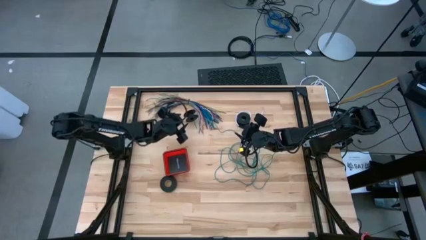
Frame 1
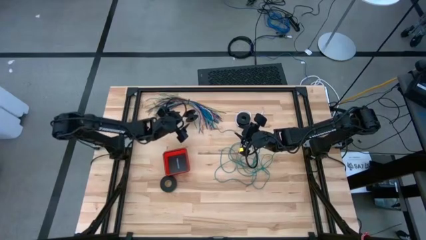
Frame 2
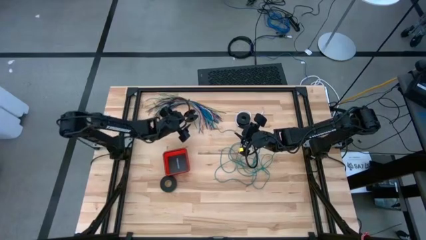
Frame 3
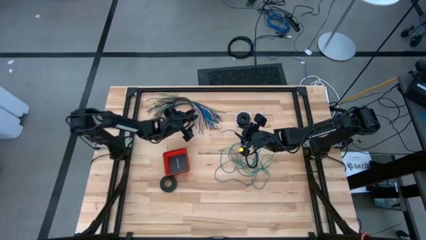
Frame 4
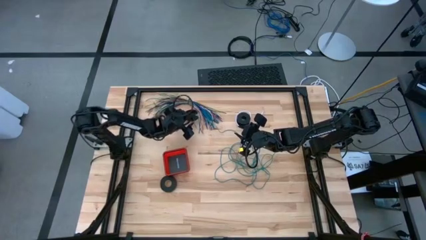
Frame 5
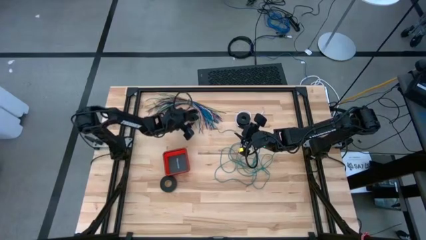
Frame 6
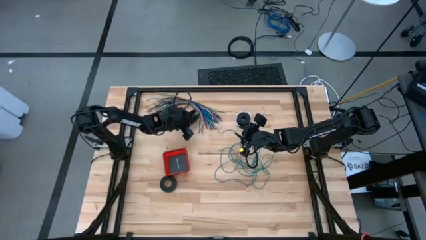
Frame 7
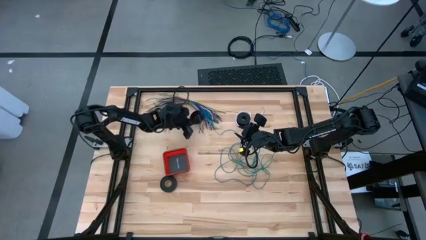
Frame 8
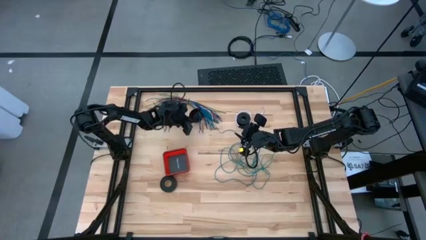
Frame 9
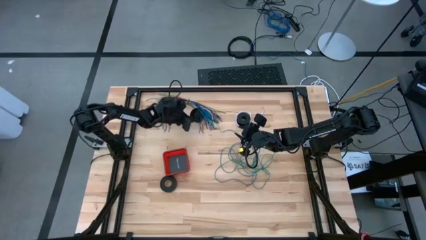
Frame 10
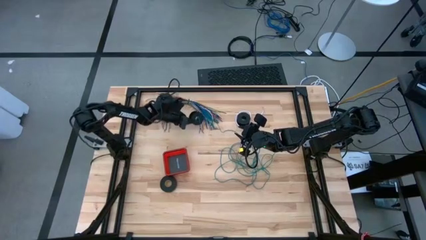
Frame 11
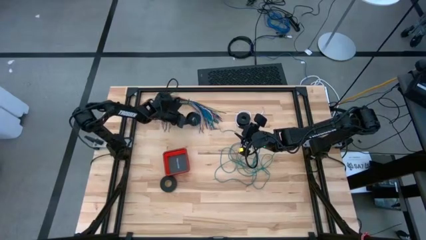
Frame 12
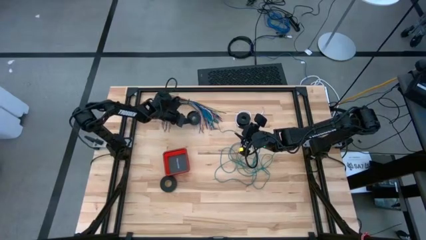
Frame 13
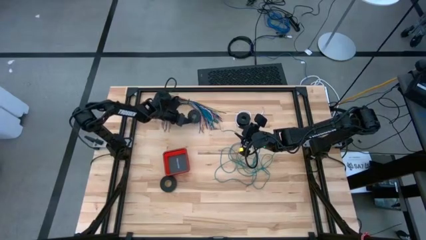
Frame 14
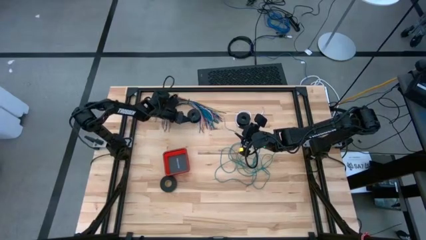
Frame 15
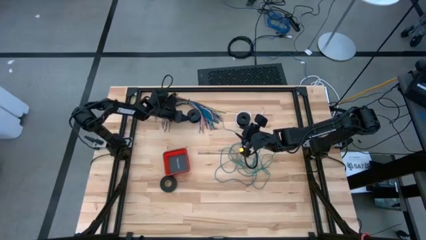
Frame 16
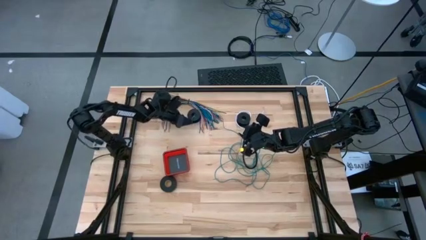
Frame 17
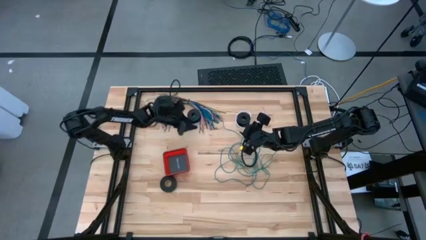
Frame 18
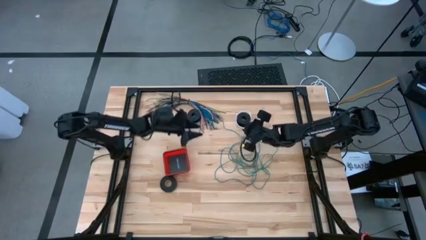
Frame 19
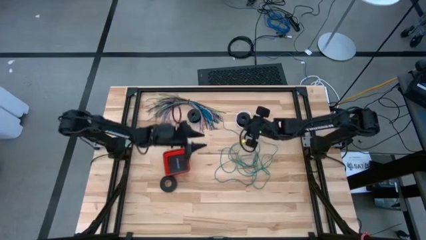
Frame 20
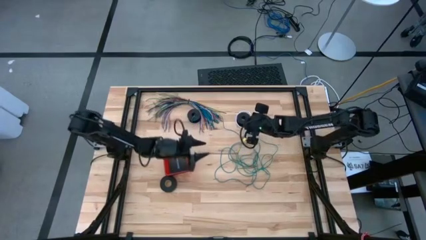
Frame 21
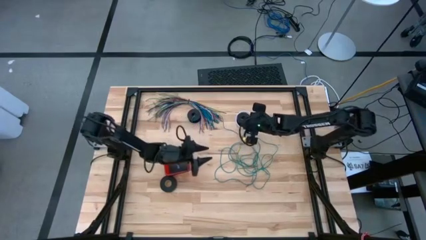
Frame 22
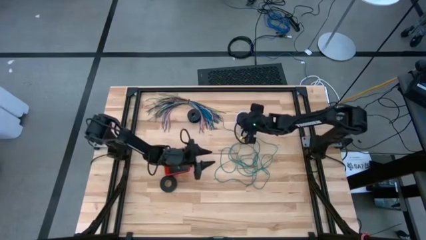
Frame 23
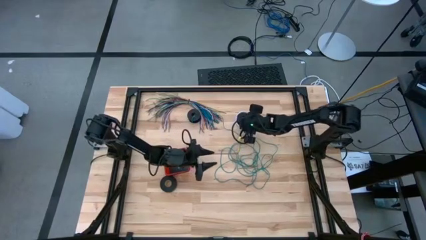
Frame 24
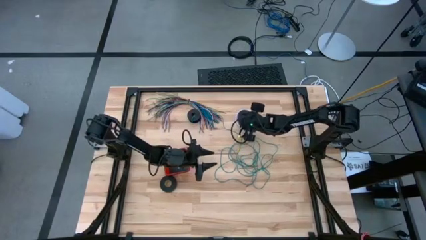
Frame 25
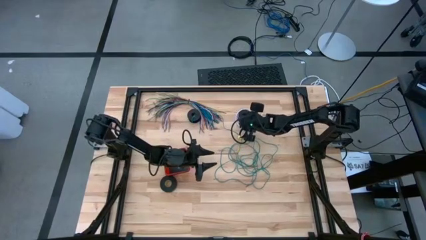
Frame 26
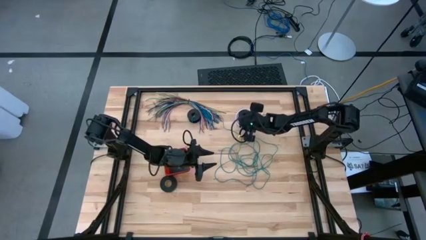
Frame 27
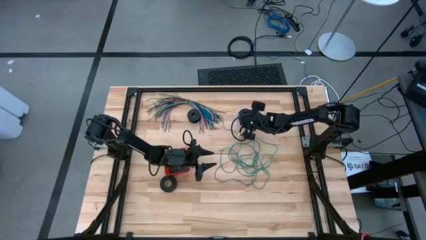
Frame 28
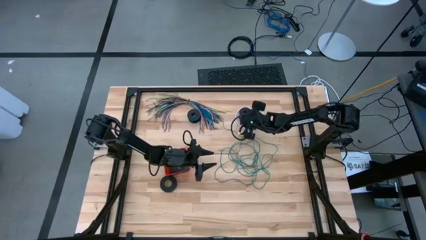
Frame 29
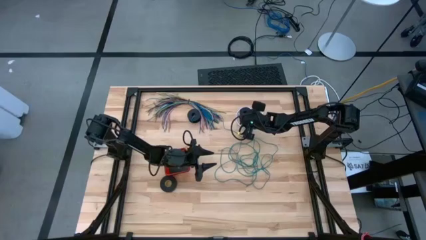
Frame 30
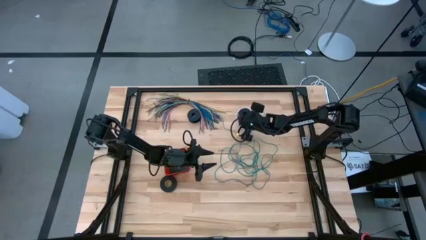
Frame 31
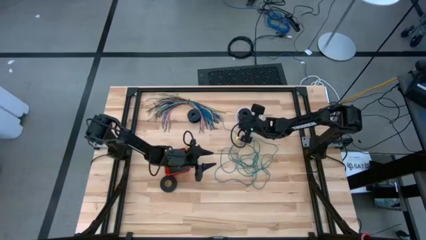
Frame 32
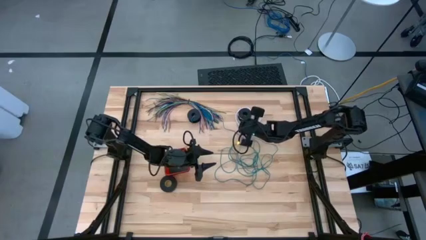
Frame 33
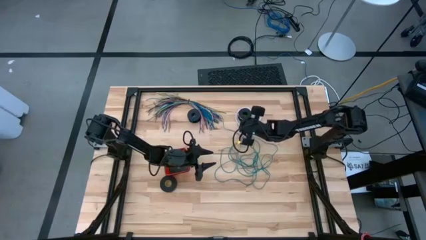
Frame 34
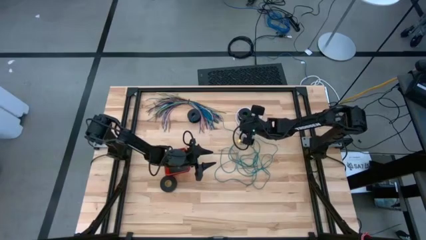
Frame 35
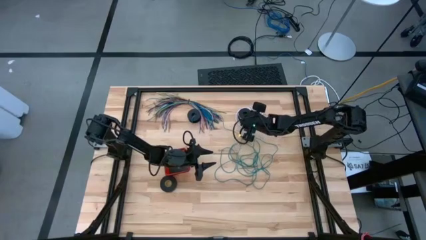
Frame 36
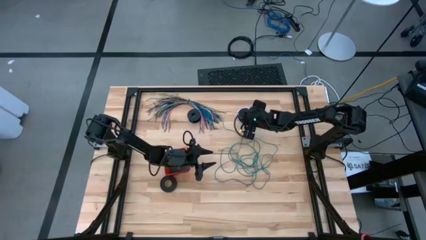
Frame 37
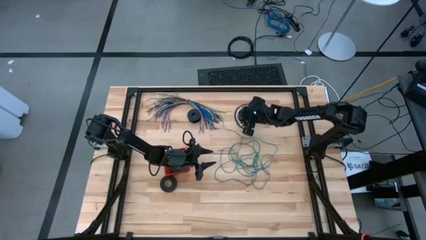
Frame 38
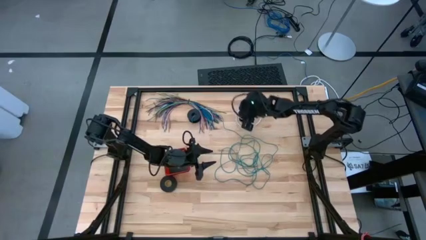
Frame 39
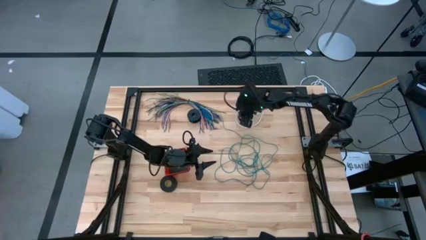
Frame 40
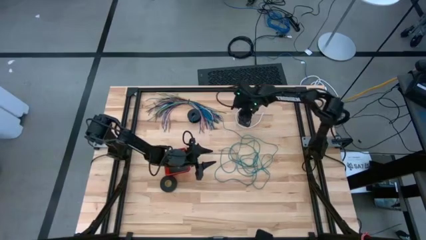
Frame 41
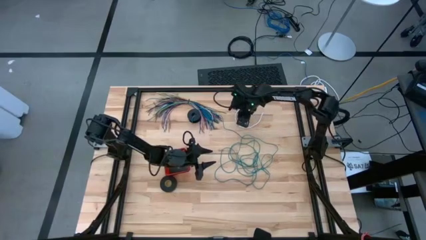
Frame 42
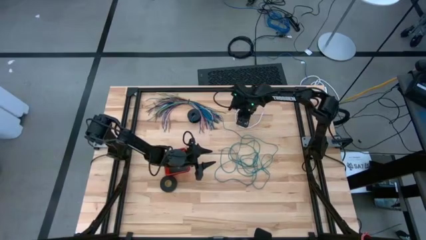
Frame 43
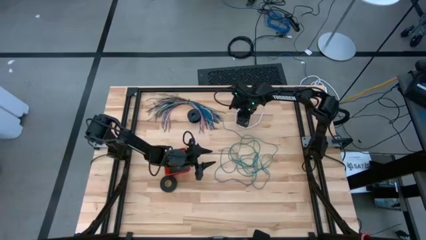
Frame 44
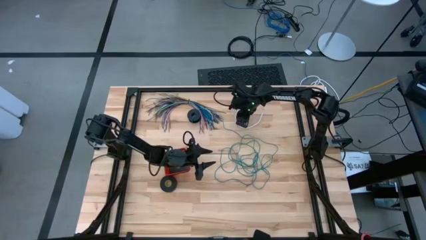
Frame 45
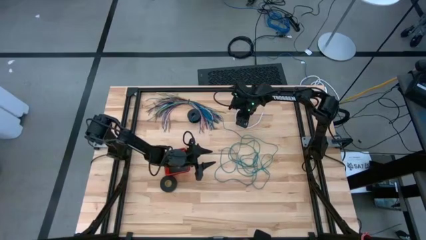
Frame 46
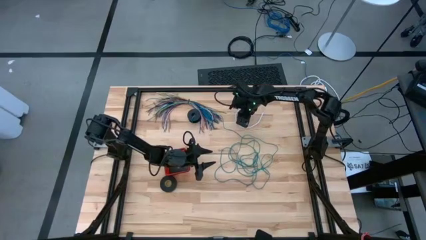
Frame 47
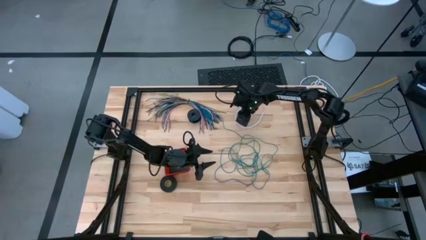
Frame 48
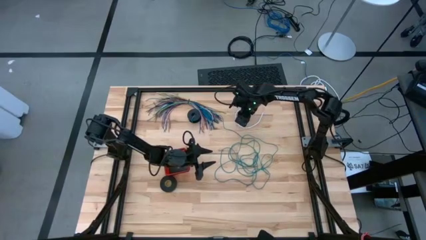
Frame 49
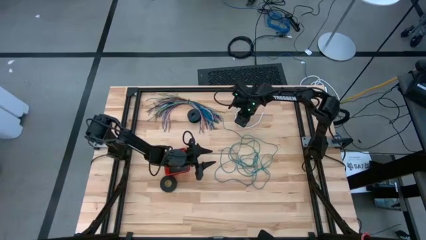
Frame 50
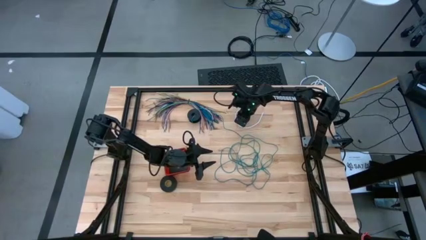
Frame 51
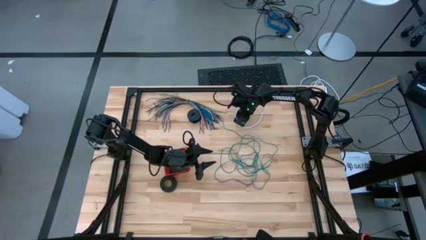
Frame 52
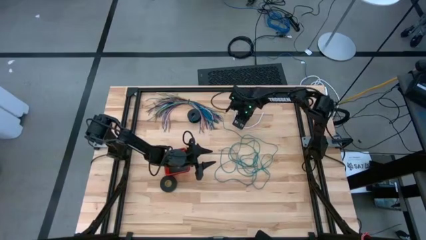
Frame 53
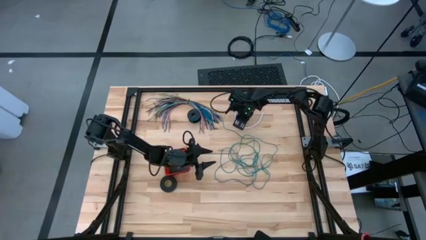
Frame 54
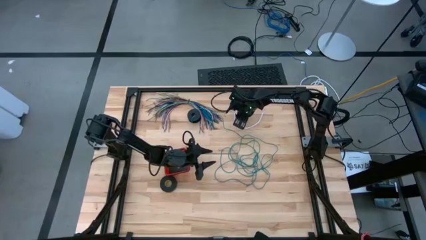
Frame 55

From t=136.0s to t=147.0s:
Task: Coil cords
Uncoil the white wire from the spool

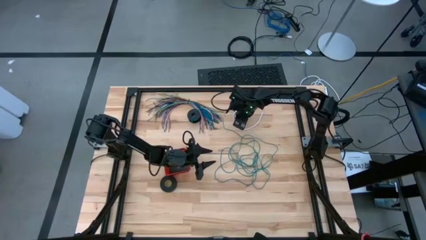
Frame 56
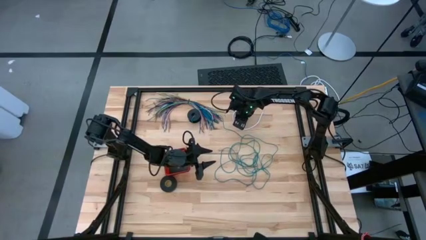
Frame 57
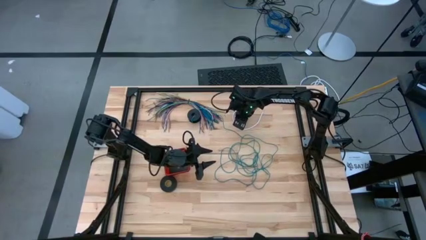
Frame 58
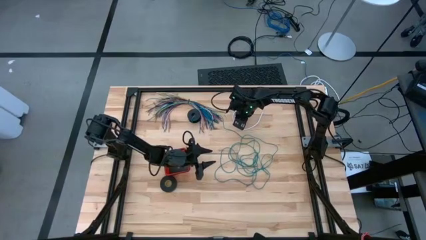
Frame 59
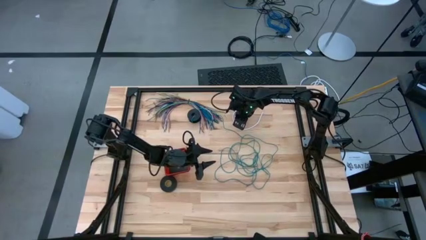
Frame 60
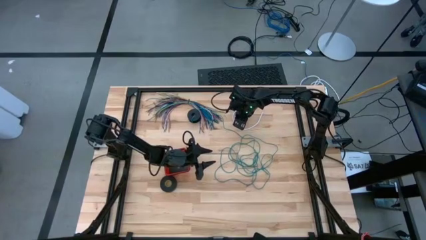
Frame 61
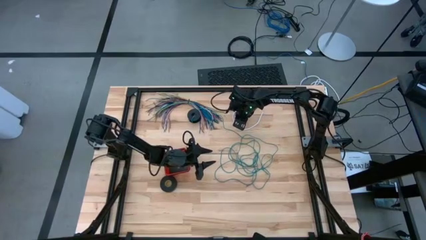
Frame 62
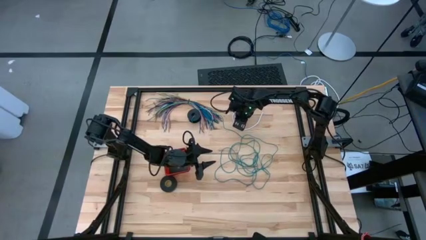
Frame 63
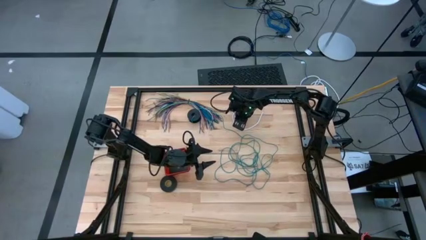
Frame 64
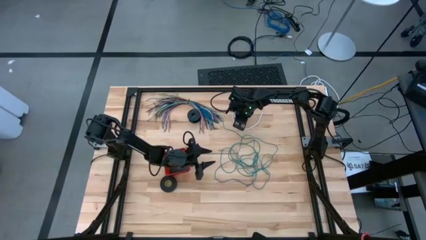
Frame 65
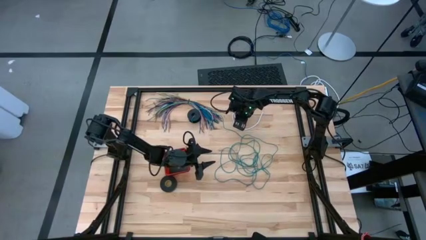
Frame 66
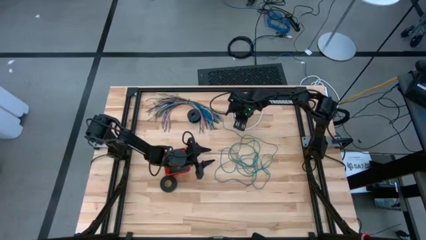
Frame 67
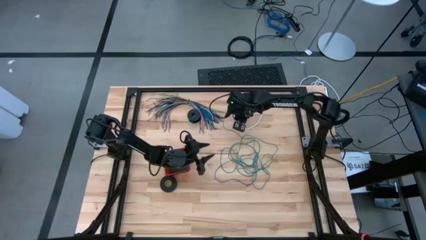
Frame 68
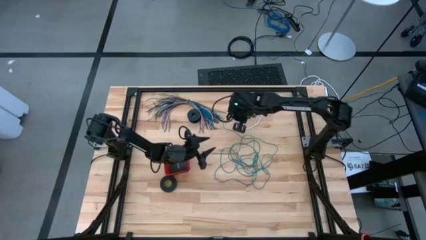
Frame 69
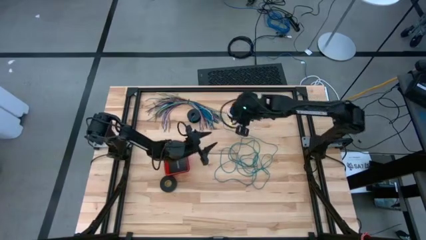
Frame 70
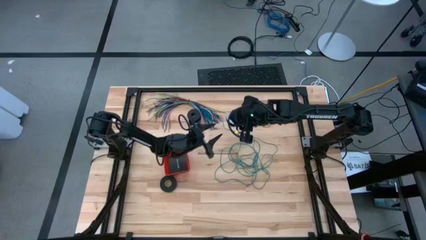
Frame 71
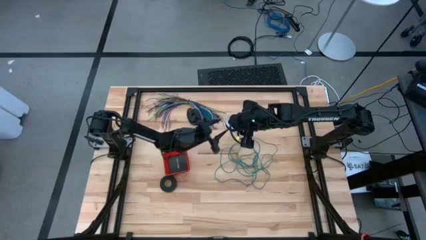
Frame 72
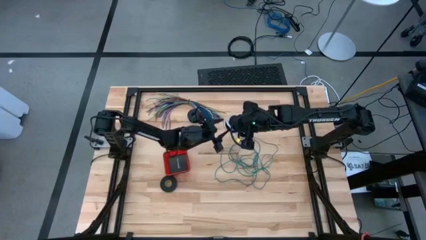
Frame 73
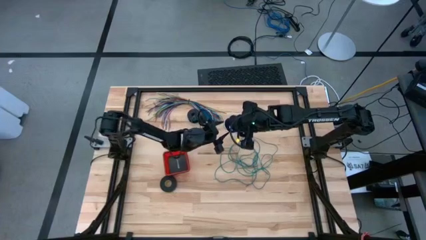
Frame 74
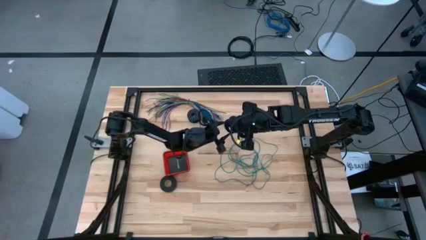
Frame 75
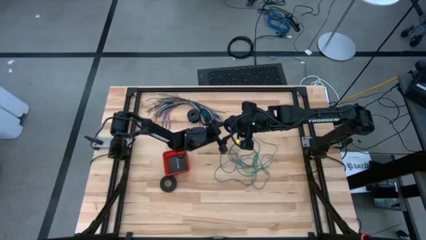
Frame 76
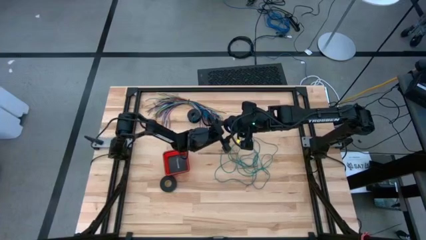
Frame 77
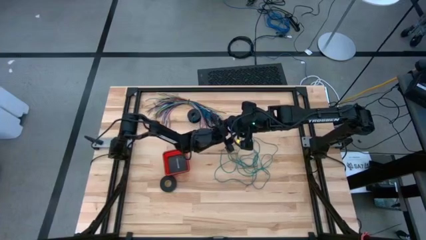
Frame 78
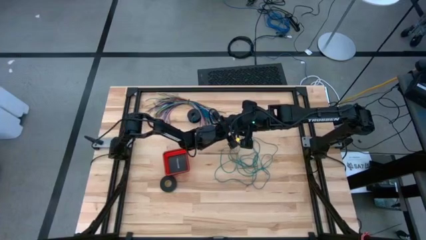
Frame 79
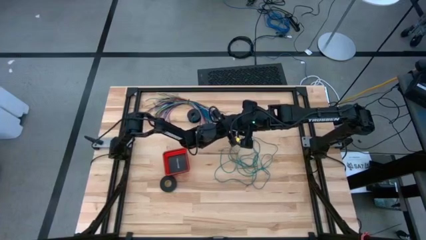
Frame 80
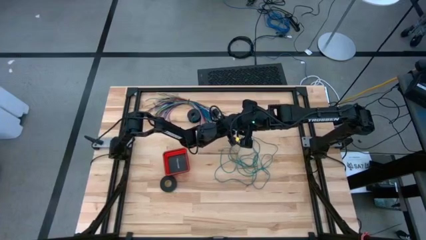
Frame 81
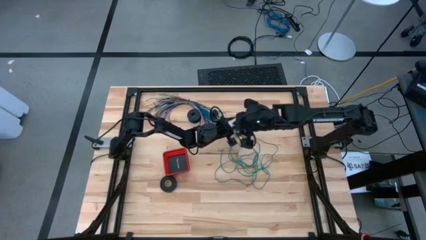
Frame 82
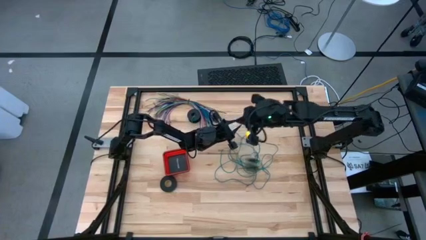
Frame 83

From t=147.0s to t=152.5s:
Uncoil the white wire from the spool
